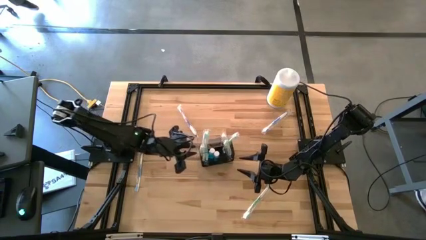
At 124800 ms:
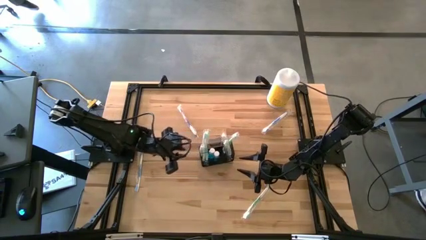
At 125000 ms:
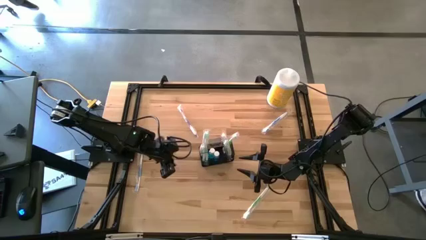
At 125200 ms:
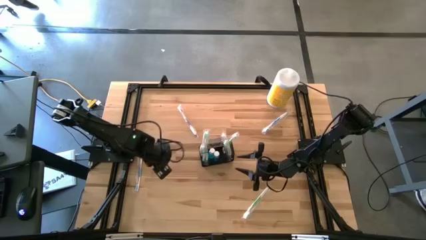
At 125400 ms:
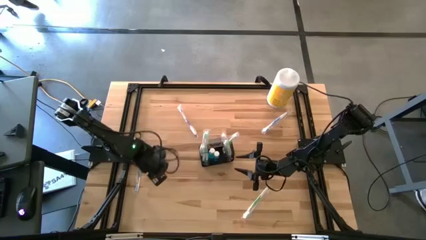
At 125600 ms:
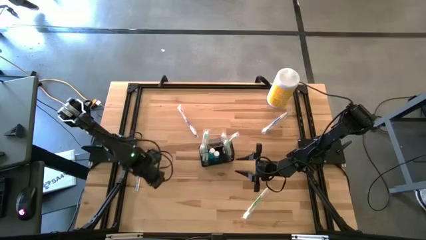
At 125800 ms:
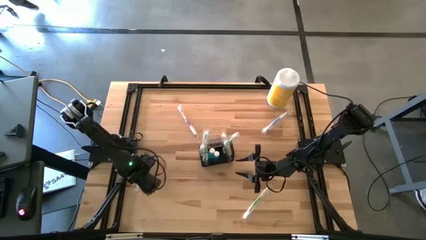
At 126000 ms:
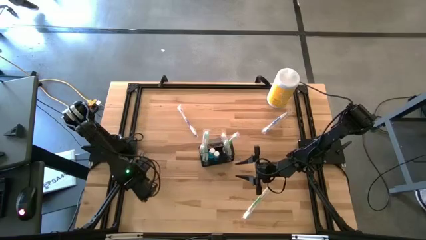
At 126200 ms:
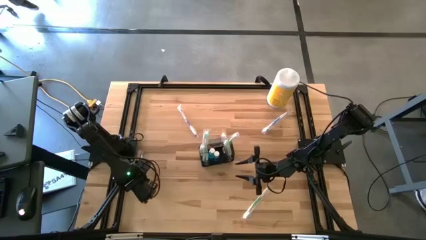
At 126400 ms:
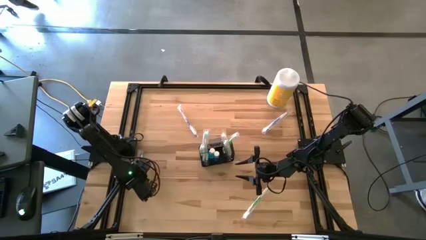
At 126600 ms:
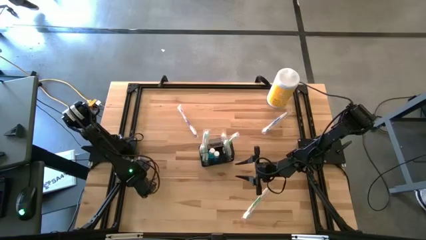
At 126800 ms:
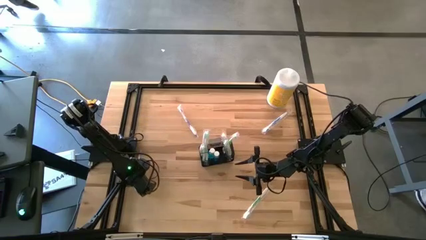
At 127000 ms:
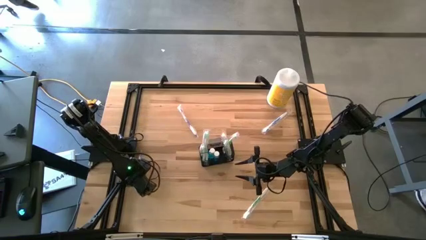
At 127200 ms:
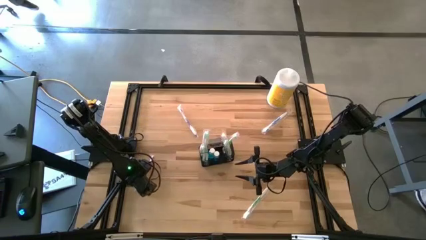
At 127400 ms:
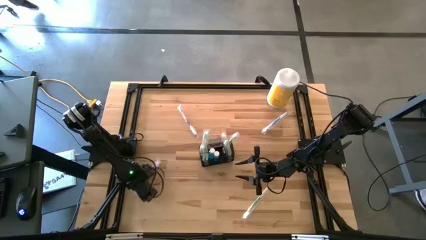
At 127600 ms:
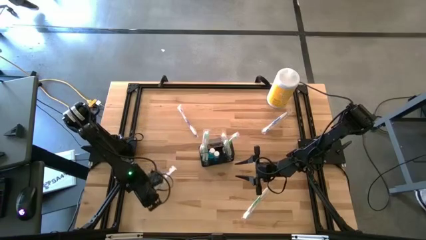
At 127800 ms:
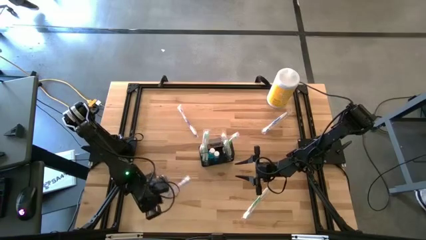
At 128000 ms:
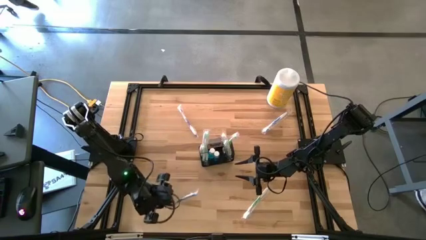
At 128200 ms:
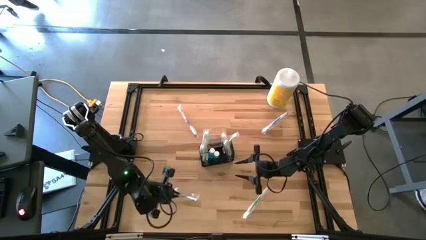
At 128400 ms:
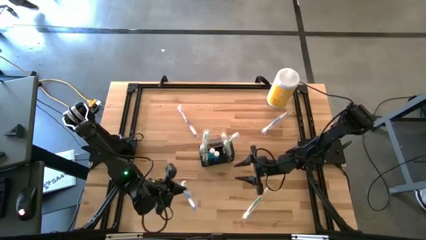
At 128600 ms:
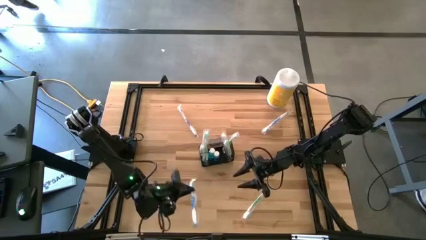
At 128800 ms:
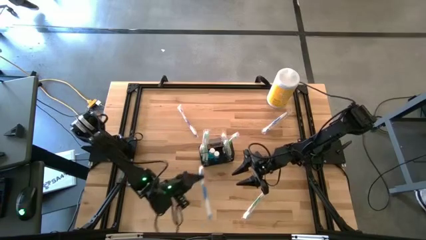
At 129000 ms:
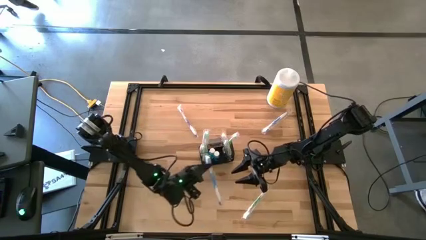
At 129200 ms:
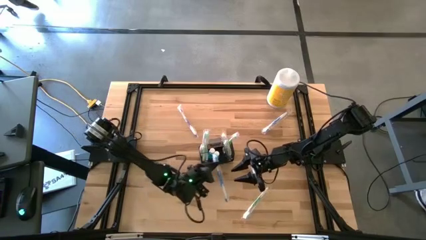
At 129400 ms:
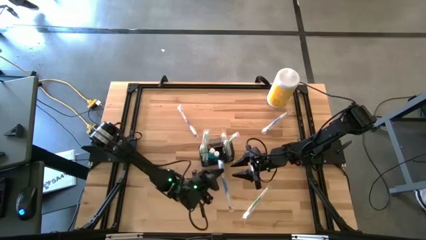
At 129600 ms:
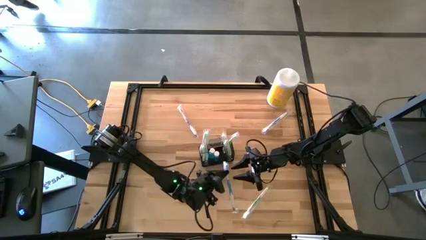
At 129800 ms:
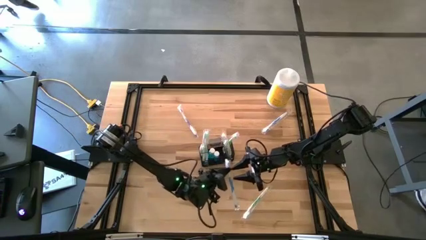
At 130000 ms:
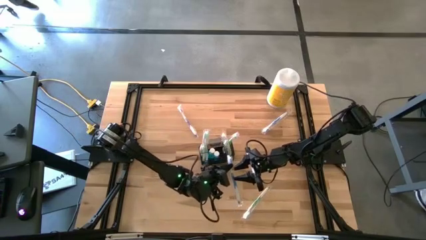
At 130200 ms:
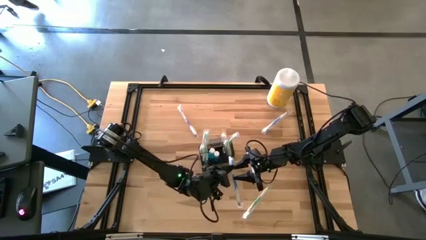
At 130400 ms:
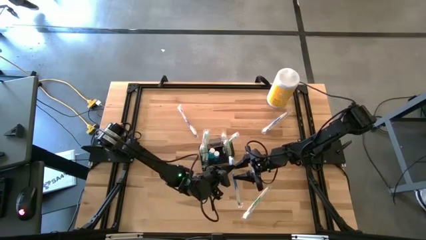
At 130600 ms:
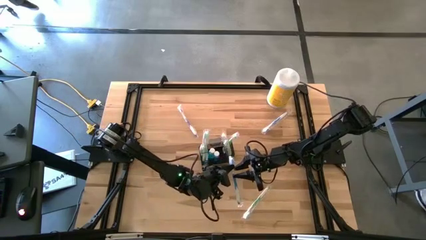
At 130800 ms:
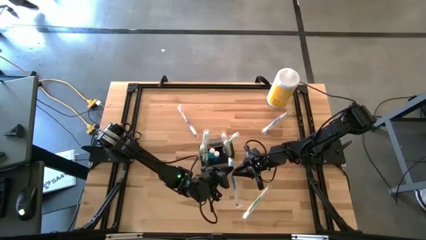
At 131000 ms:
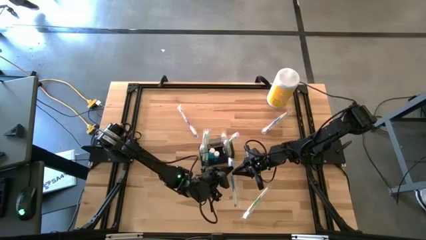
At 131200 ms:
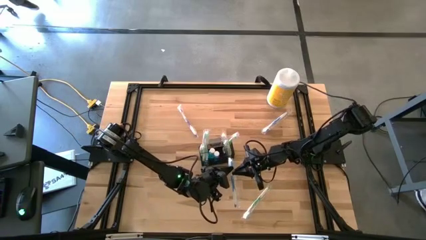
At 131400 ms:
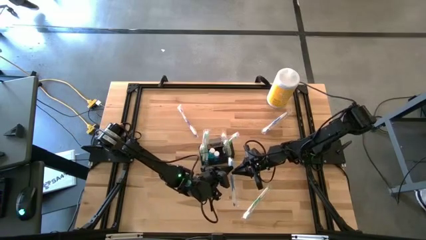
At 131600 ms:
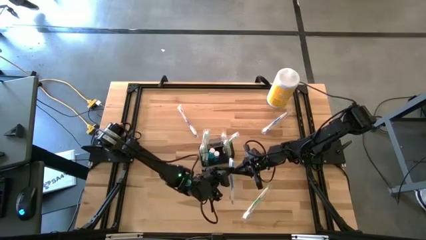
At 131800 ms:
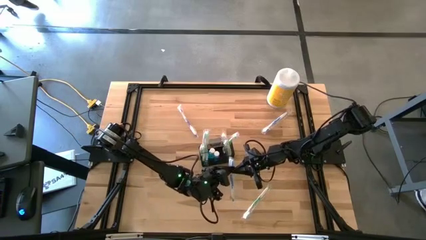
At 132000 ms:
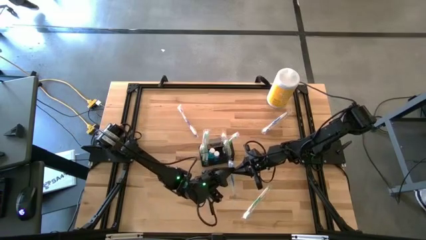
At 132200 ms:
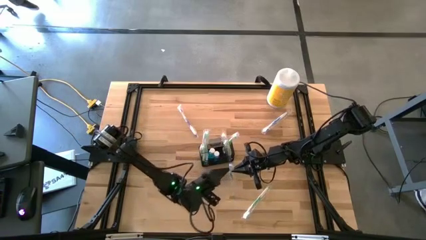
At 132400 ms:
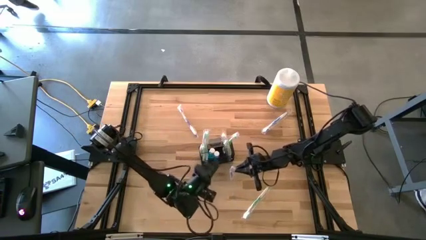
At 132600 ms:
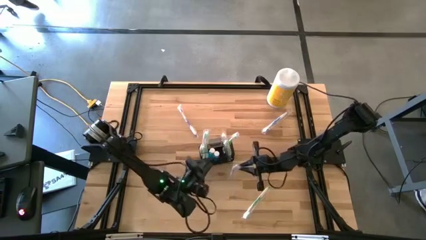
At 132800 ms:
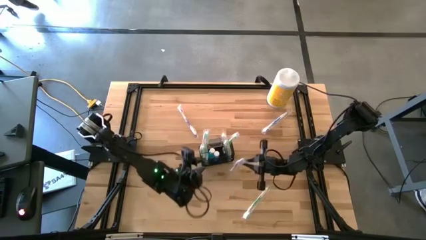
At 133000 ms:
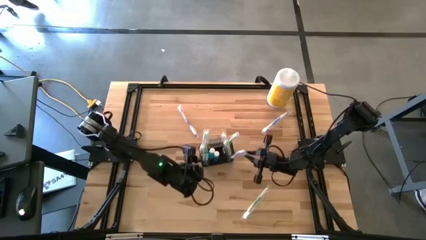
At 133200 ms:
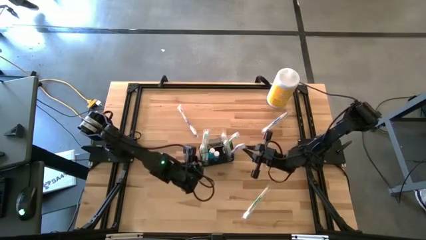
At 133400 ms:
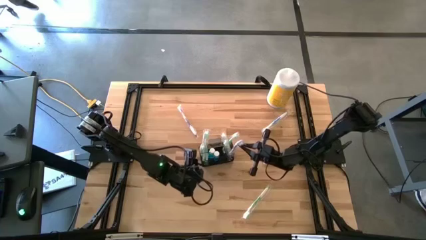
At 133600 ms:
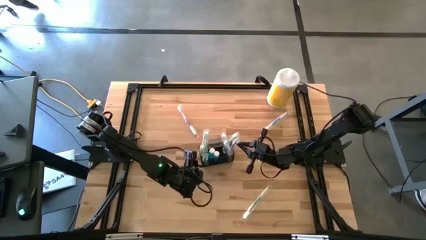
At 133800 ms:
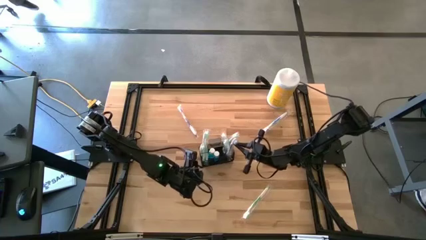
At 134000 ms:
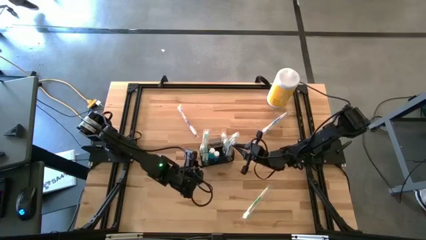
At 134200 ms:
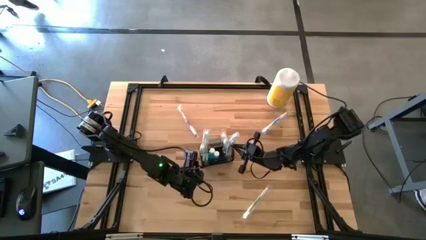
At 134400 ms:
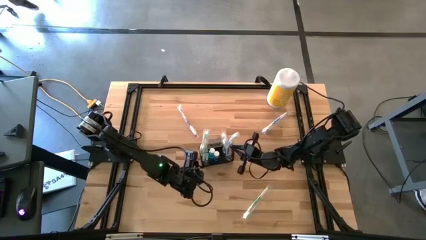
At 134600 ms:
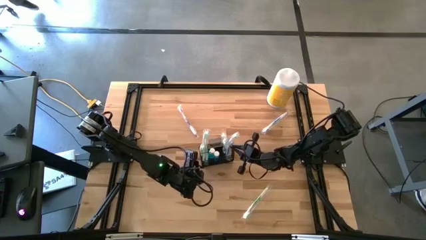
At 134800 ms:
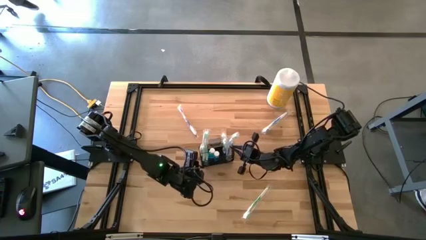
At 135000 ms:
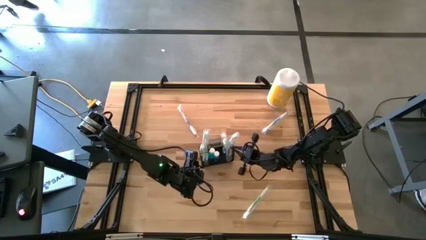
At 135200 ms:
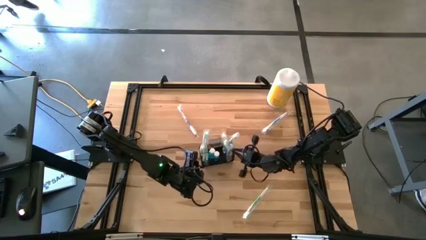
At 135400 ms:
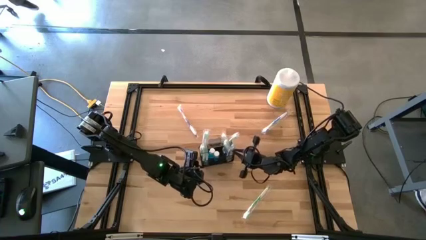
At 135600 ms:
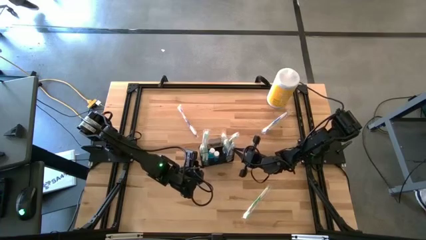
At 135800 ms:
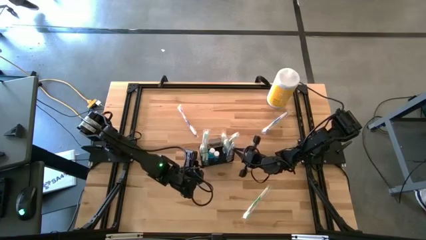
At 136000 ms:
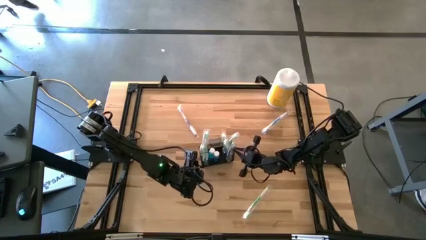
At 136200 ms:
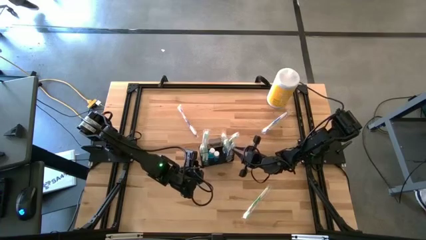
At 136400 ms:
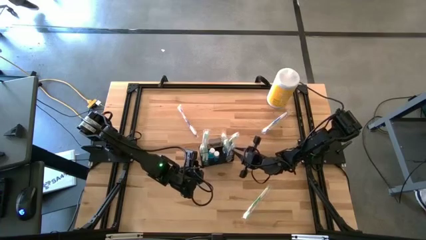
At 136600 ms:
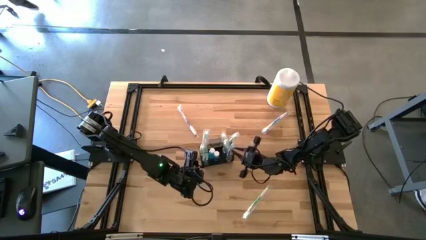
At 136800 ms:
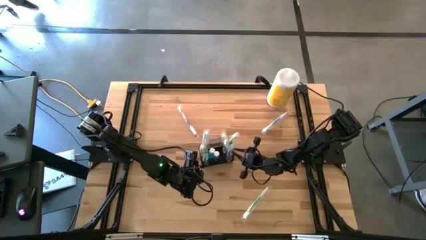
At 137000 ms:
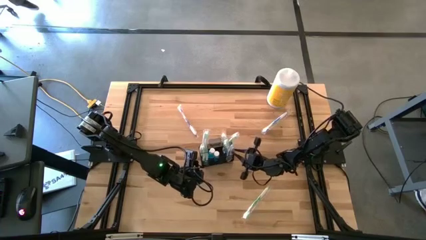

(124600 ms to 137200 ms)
Task: Pick & Place toothbrushing station
Put the left blue toothbrush into the black mesh organizer

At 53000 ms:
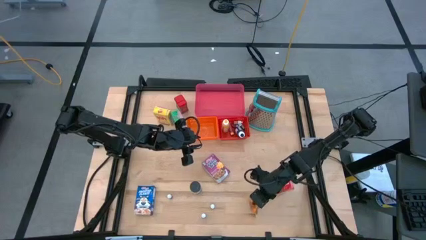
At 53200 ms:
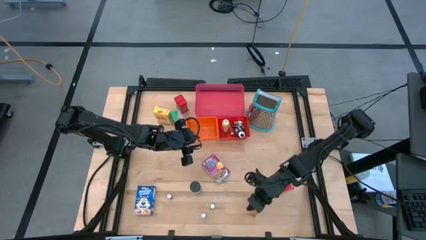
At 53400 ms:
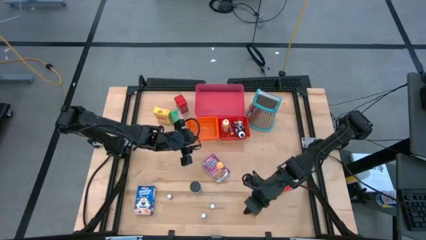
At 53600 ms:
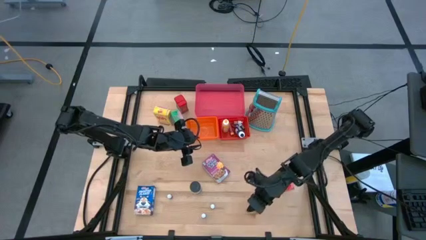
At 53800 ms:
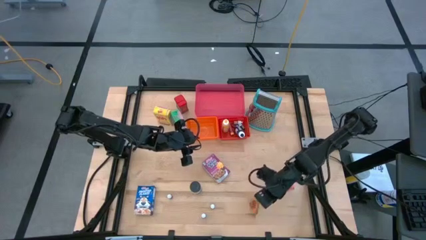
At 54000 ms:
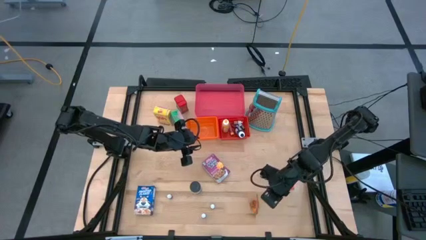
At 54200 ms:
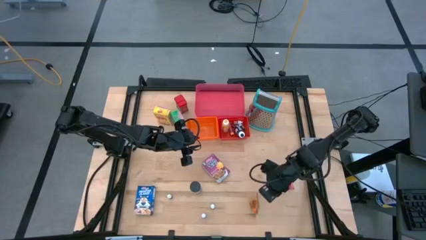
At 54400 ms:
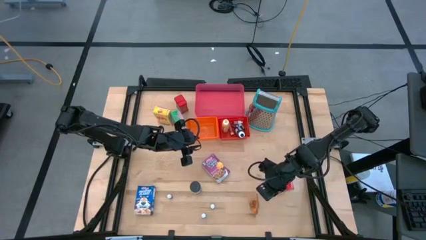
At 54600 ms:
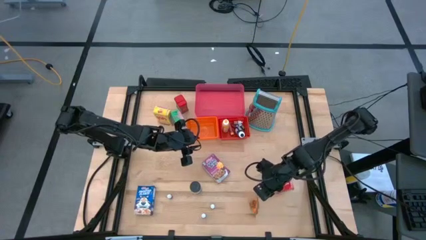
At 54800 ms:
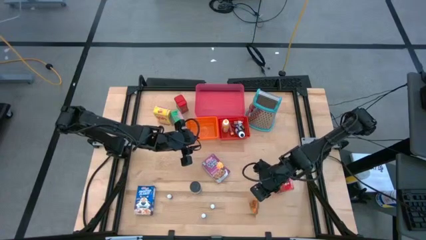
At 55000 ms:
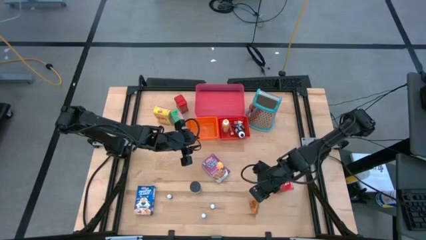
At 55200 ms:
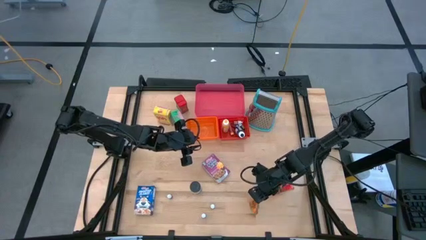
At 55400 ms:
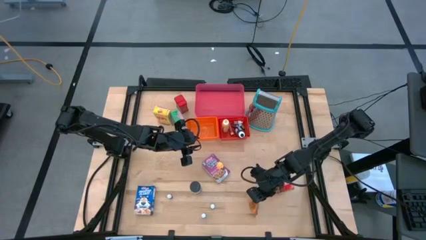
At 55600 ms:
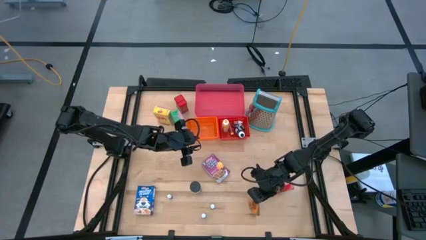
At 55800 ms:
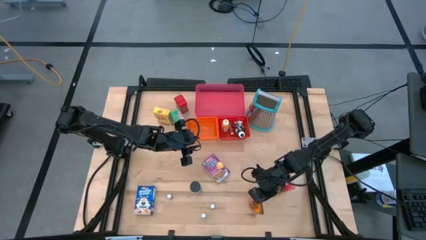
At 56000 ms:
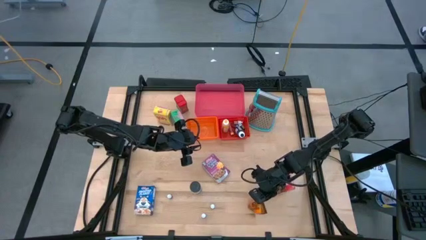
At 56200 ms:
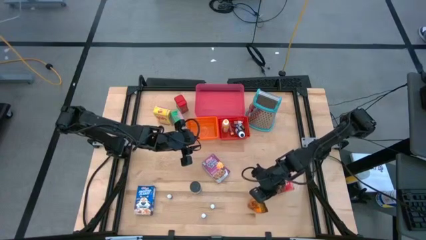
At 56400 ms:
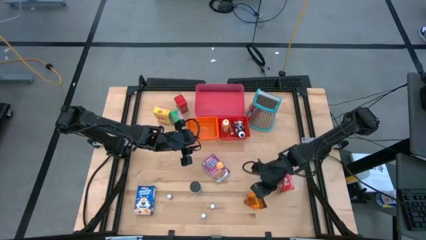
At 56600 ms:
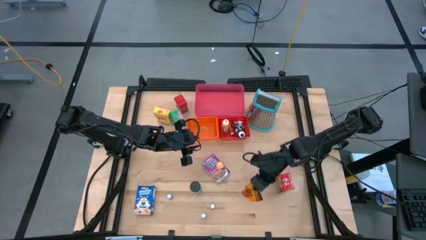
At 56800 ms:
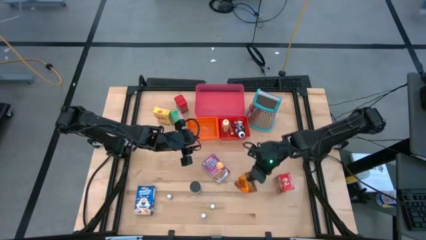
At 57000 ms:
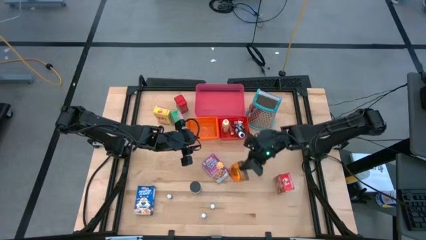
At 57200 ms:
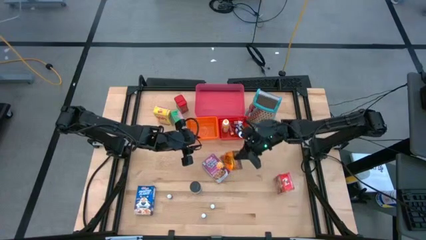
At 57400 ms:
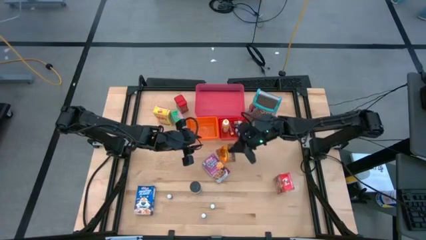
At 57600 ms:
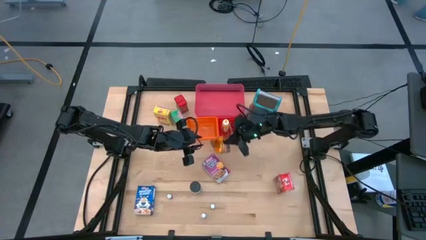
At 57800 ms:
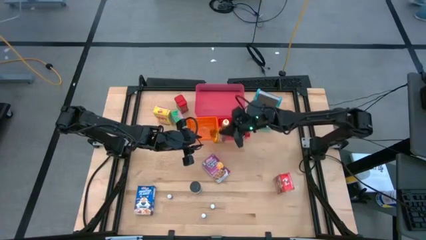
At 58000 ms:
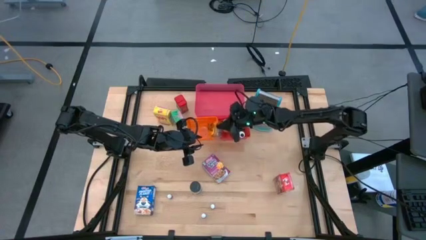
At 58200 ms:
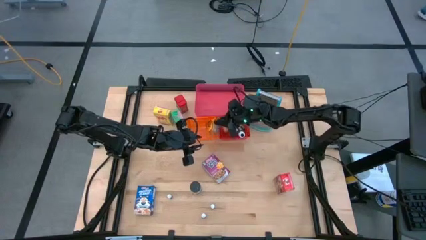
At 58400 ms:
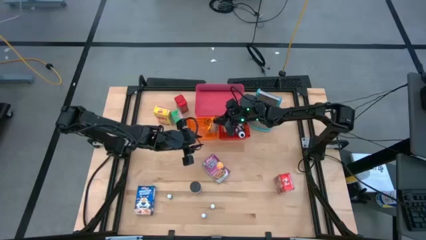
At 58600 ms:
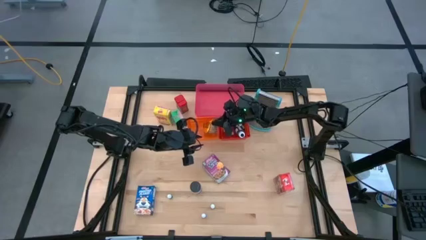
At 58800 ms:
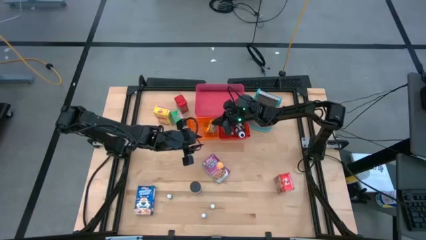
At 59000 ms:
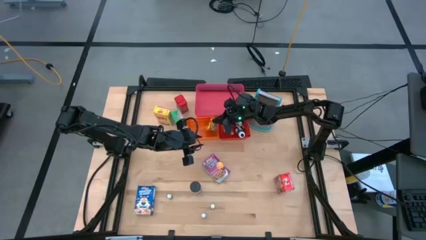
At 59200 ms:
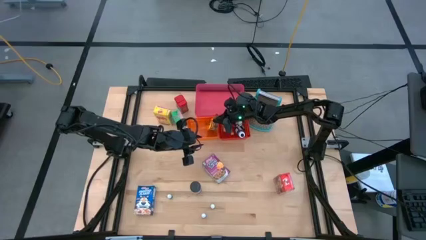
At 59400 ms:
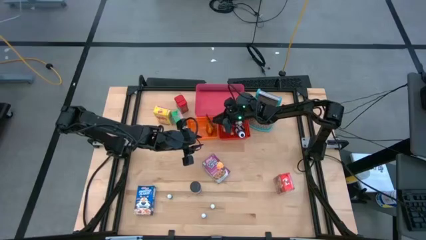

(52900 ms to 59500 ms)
Task: Pick & Place Kitchen Items
Put the orange seasoning bag into the orange bin
